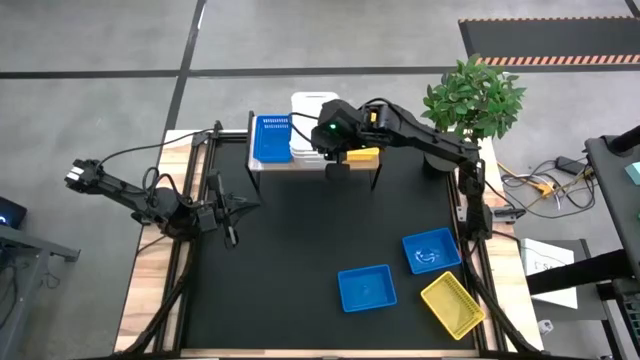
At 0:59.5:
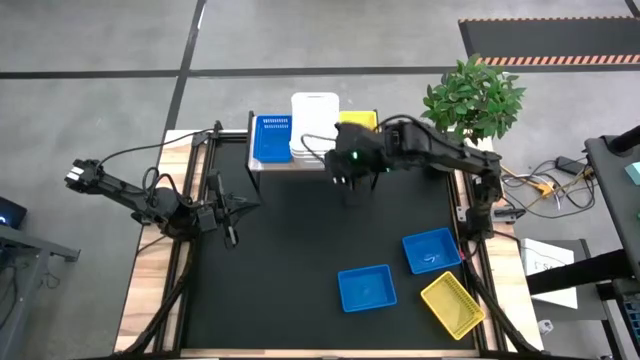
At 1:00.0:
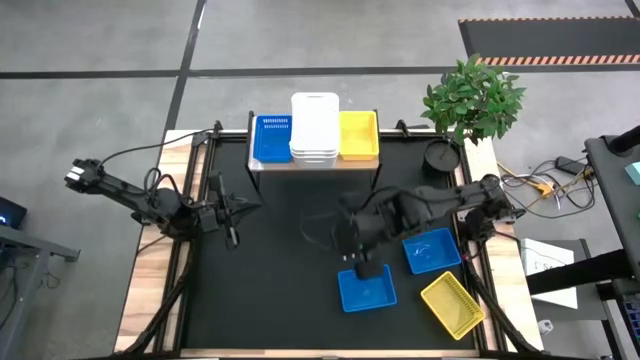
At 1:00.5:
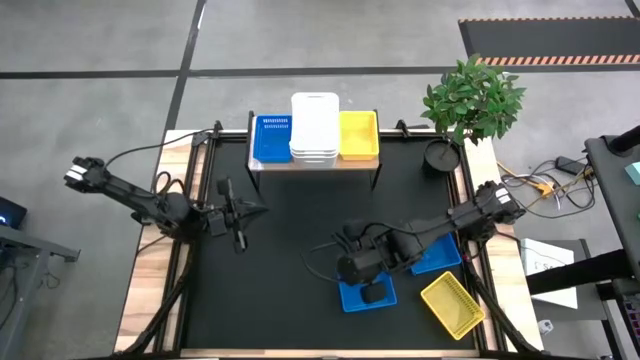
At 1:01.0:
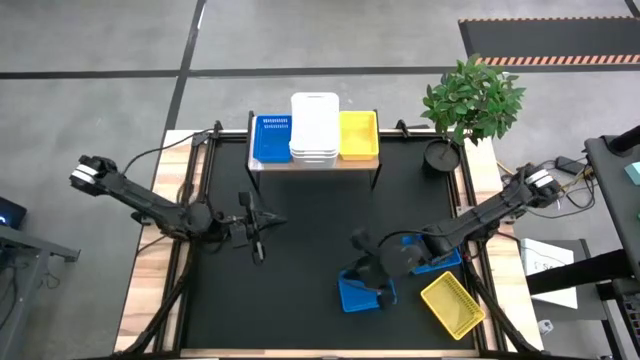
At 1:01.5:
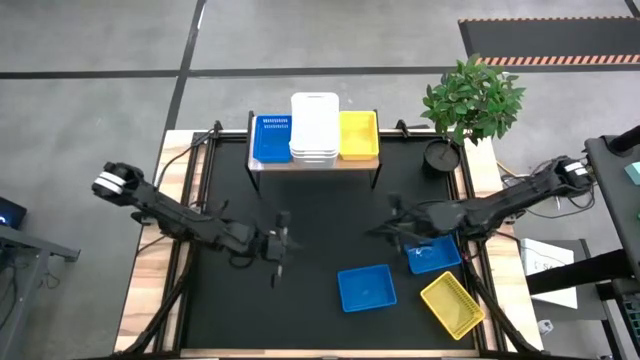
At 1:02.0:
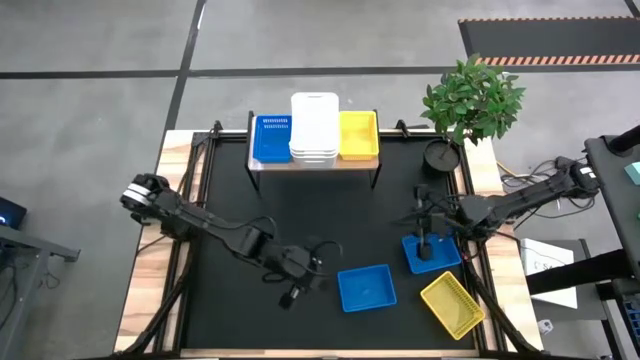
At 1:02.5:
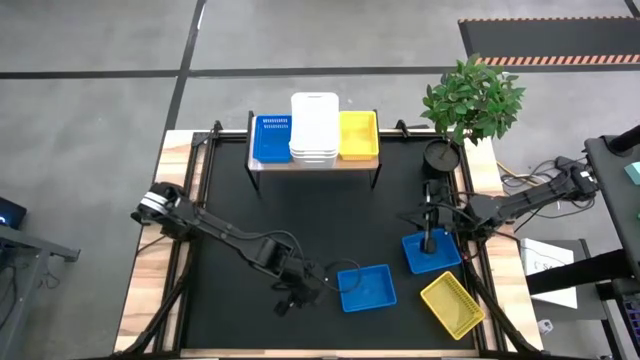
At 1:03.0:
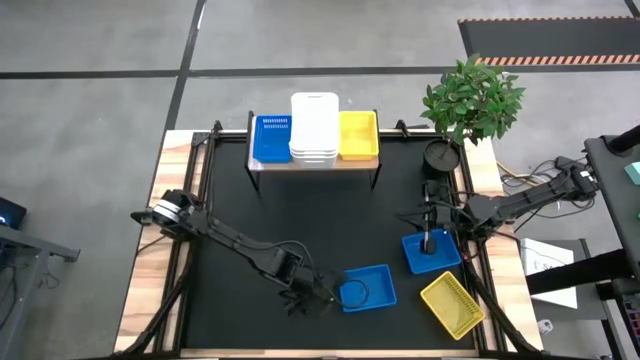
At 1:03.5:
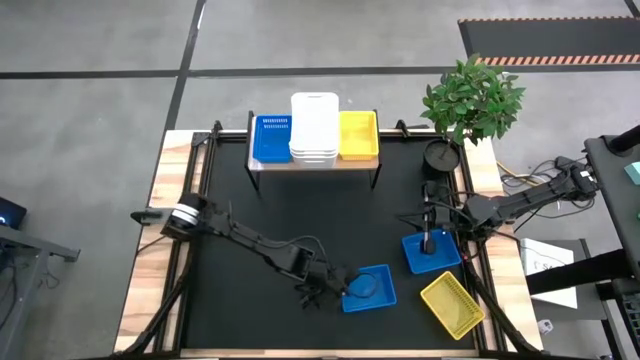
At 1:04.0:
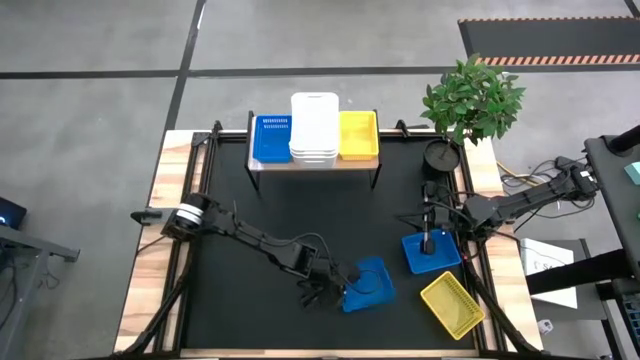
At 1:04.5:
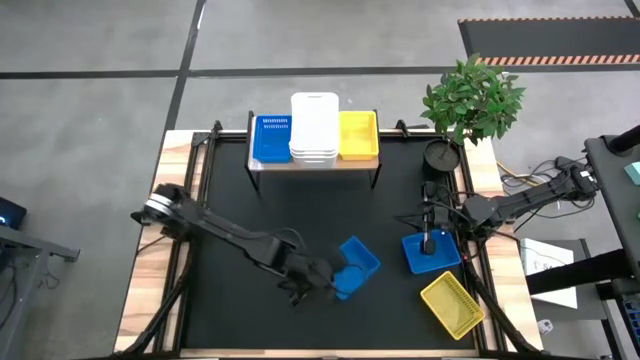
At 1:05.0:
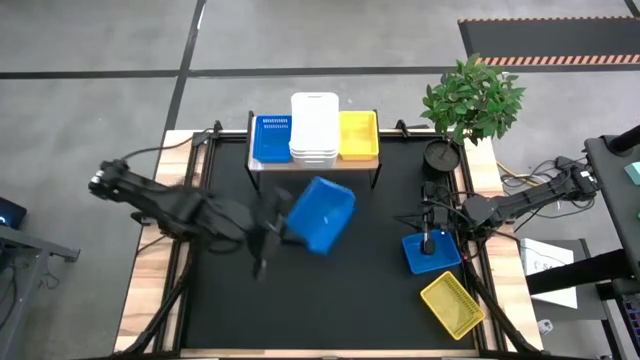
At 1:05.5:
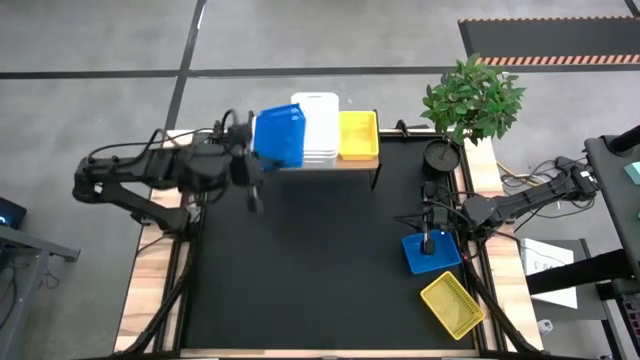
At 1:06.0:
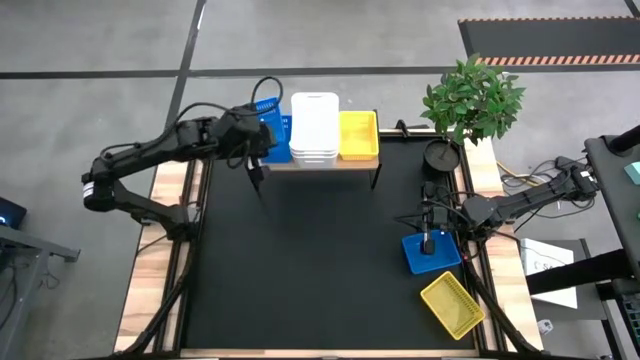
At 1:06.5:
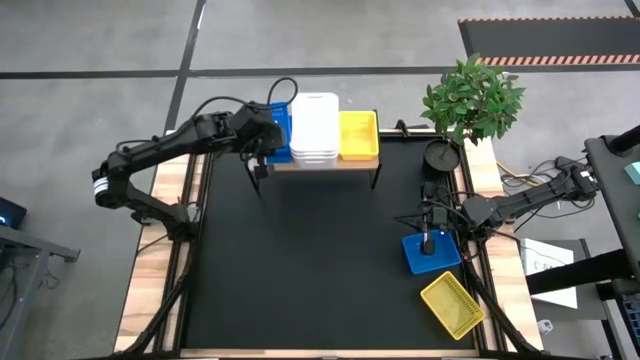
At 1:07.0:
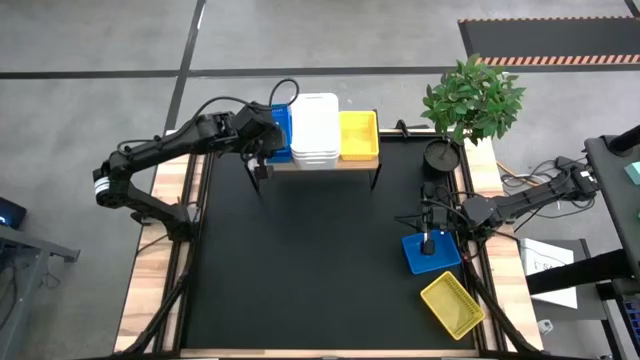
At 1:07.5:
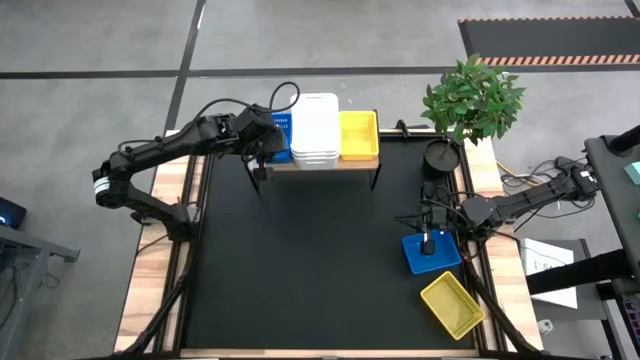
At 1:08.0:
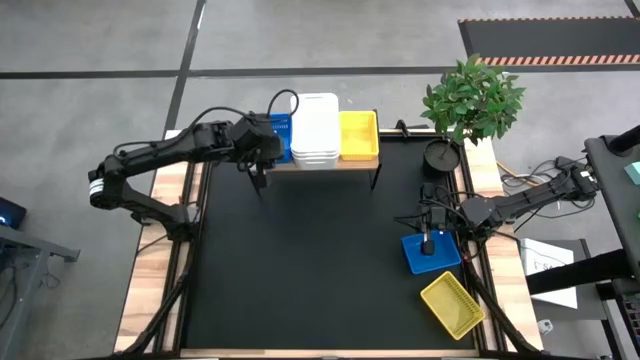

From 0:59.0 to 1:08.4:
Task: Stack baskets on shelf by color
Stack the bottom blue bin on the blue bin on the shelf

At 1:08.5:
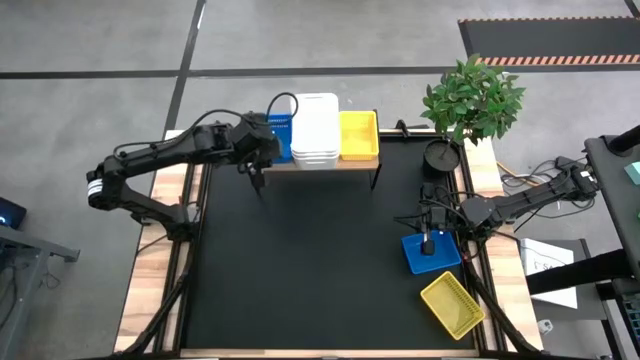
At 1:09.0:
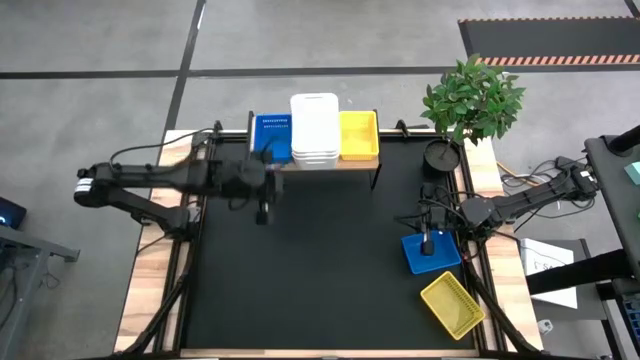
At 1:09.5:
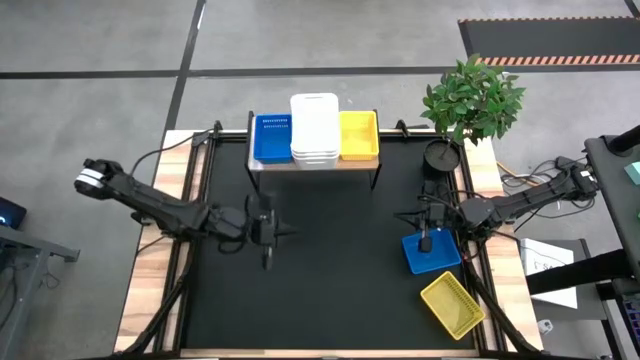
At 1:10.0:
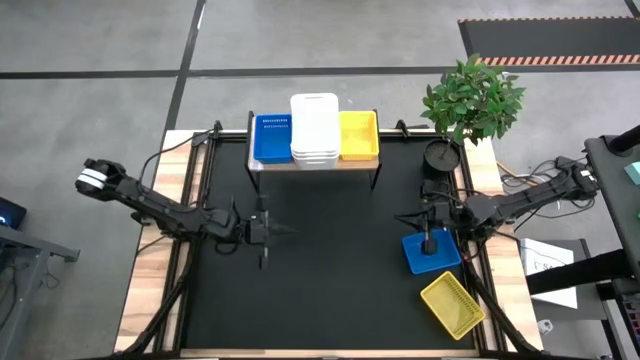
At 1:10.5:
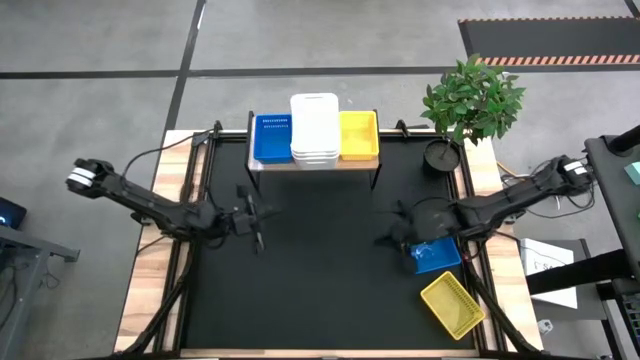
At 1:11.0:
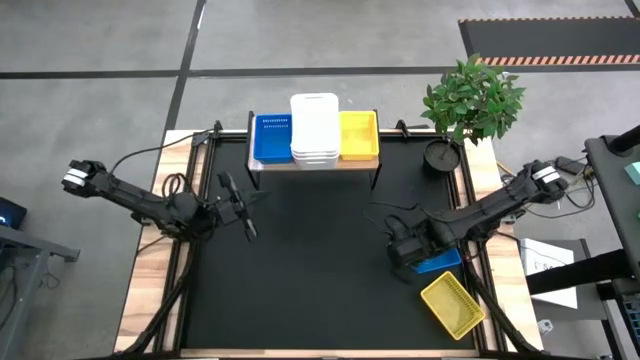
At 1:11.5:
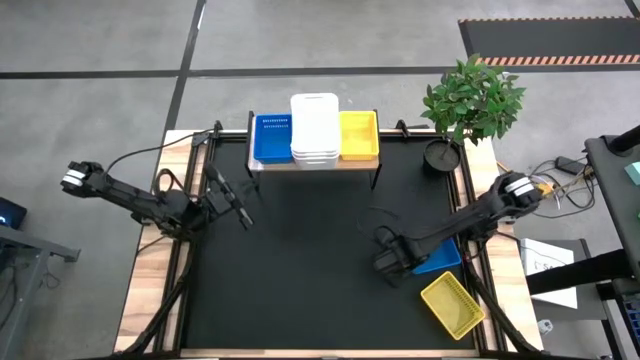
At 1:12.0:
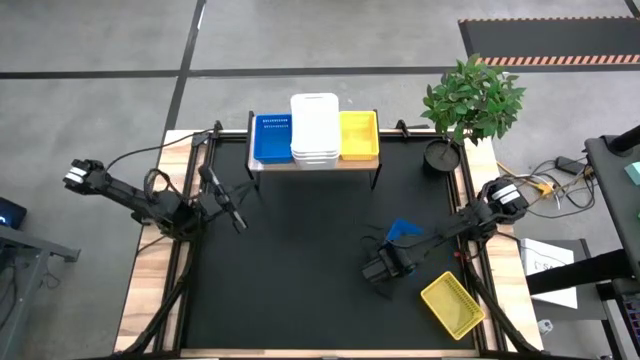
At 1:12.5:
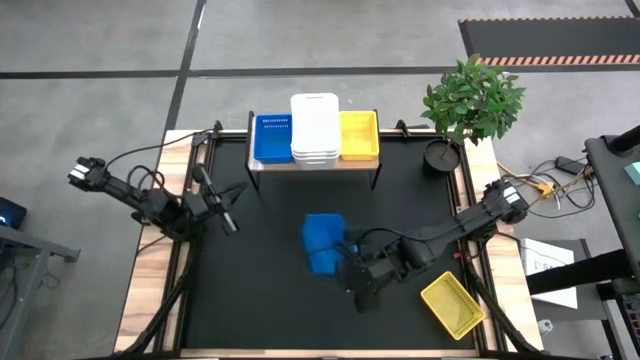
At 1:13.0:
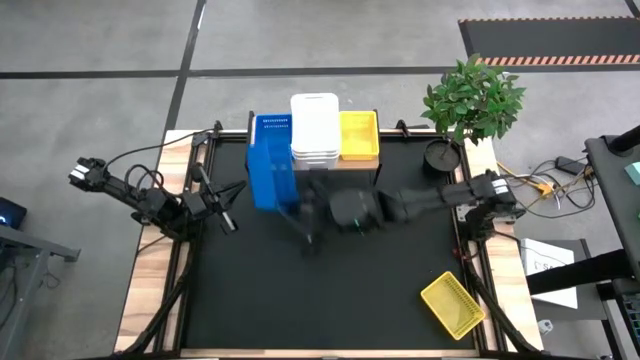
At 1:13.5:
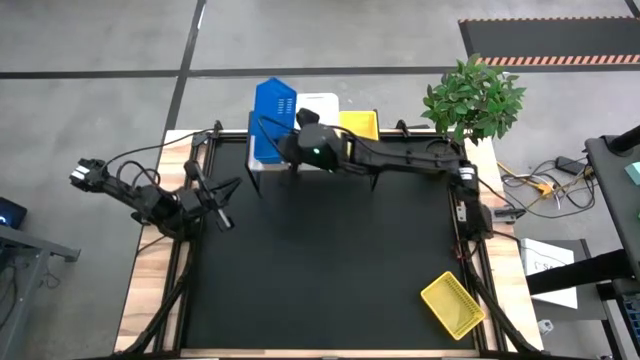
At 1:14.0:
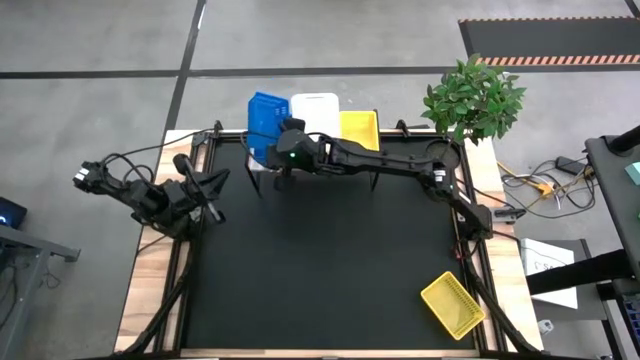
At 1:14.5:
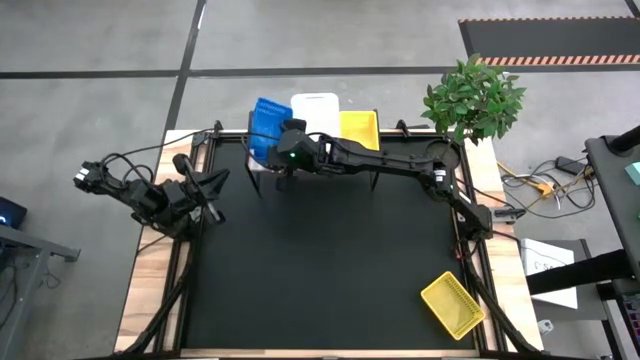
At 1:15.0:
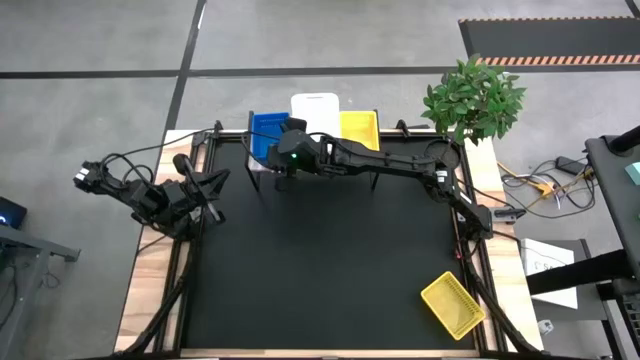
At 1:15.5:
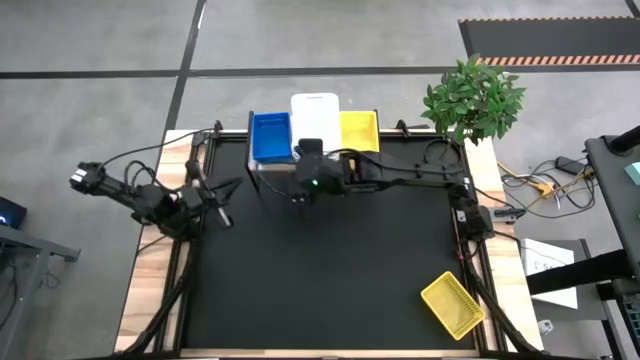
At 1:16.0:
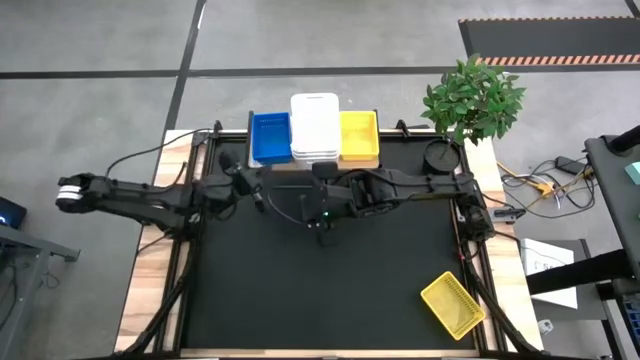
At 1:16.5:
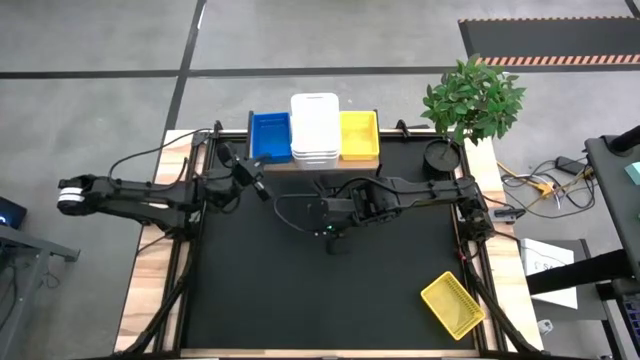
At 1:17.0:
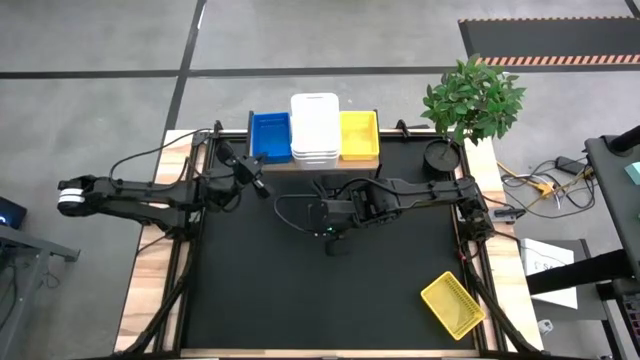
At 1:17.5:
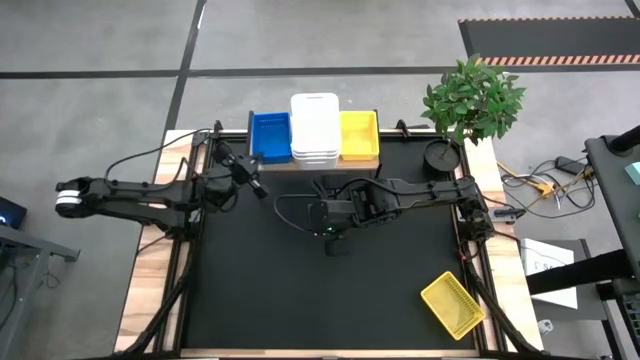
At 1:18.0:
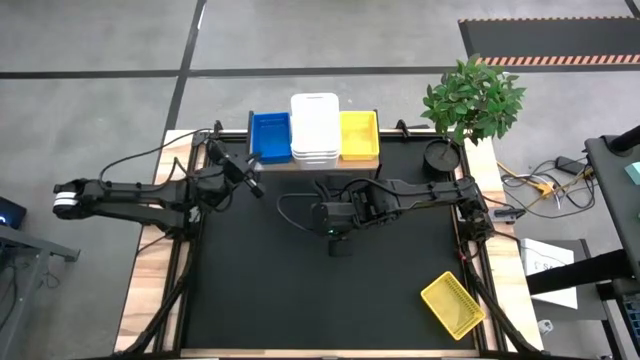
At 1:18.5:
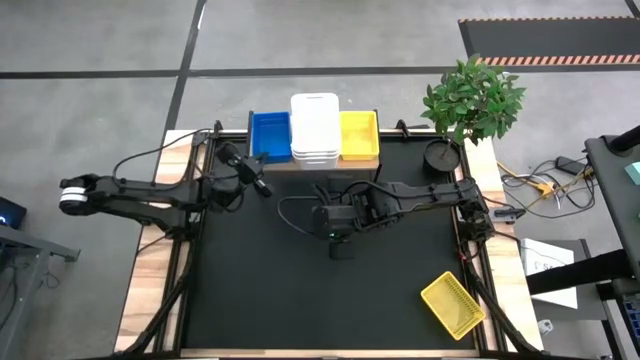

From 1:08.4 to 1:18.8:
Stack the blue bin on the blue bins on the shelf
